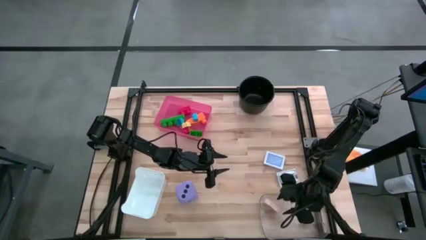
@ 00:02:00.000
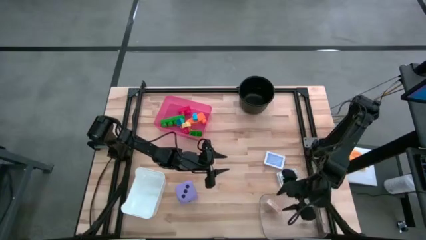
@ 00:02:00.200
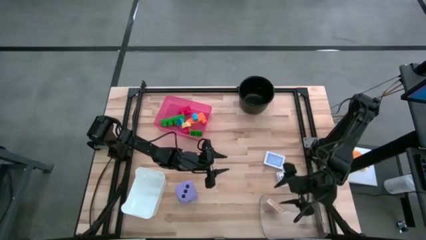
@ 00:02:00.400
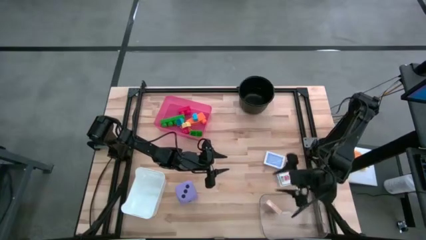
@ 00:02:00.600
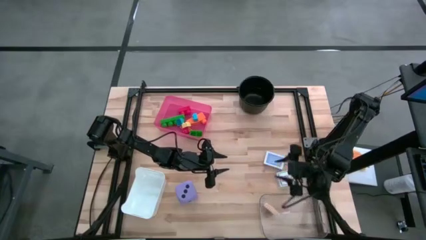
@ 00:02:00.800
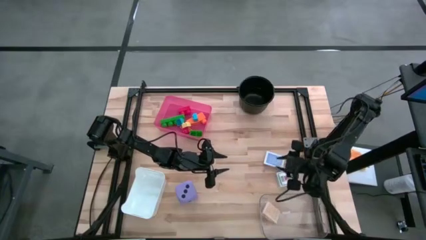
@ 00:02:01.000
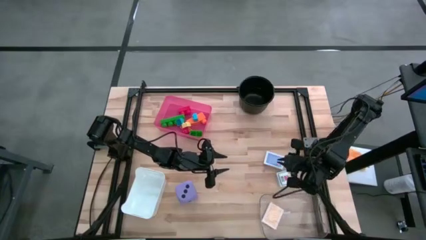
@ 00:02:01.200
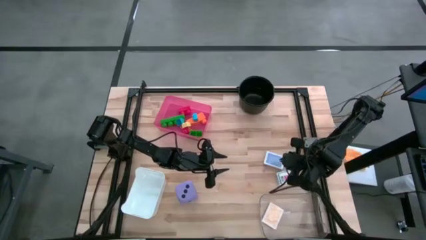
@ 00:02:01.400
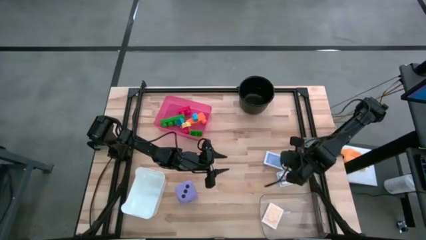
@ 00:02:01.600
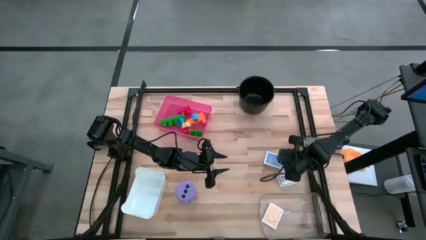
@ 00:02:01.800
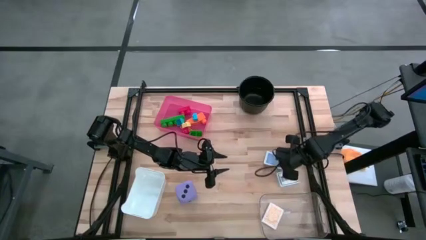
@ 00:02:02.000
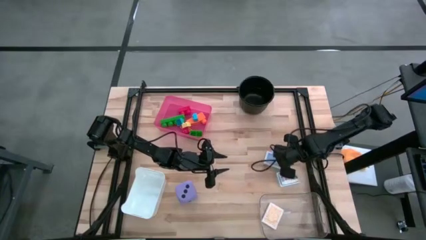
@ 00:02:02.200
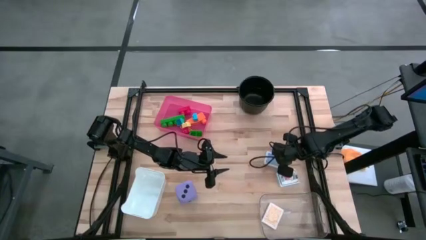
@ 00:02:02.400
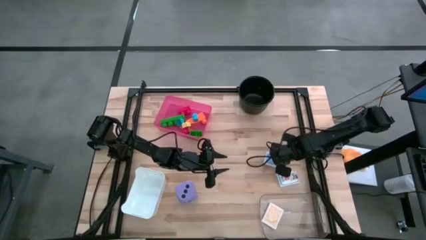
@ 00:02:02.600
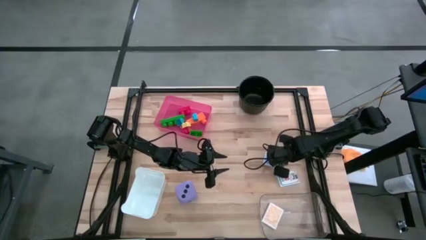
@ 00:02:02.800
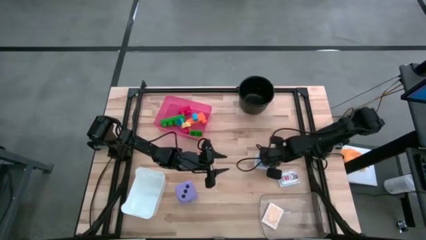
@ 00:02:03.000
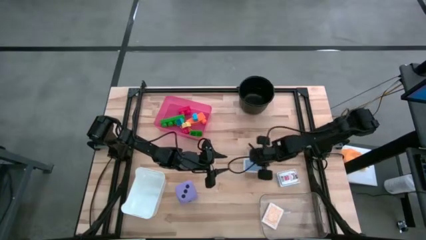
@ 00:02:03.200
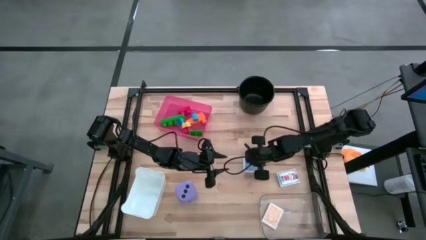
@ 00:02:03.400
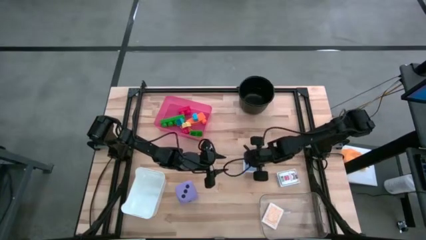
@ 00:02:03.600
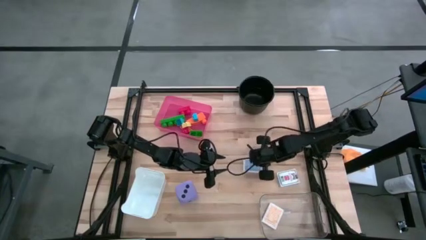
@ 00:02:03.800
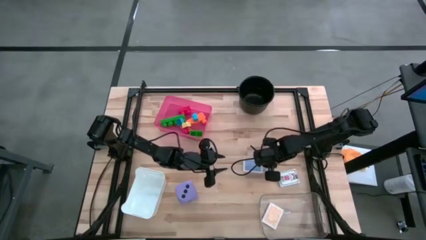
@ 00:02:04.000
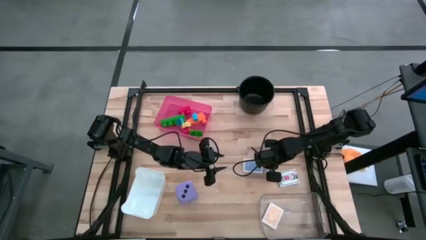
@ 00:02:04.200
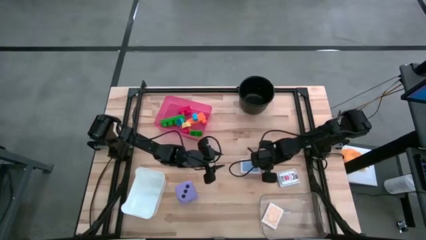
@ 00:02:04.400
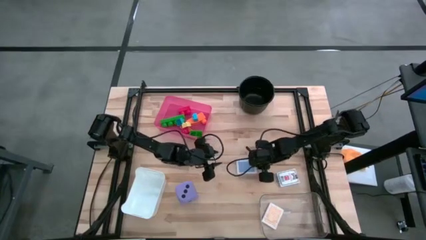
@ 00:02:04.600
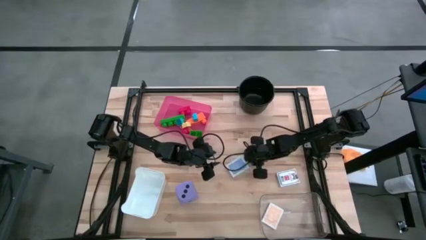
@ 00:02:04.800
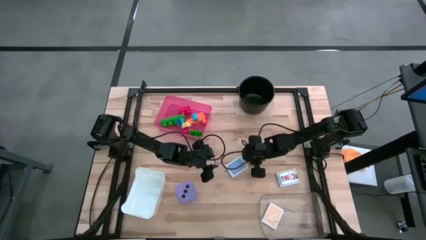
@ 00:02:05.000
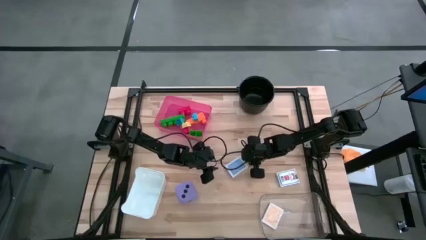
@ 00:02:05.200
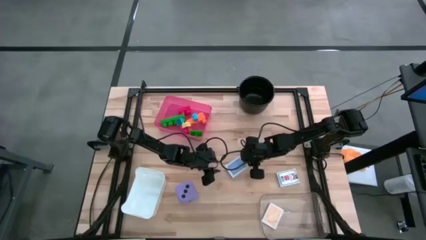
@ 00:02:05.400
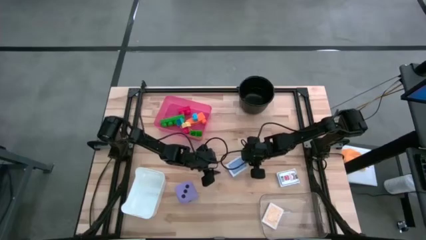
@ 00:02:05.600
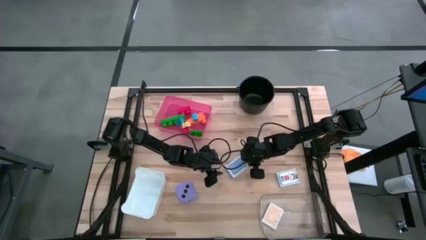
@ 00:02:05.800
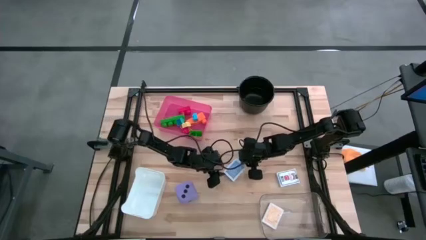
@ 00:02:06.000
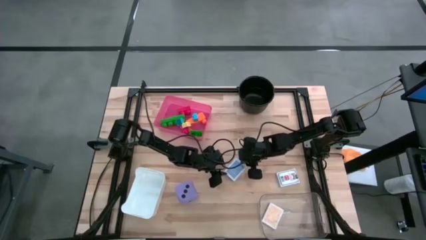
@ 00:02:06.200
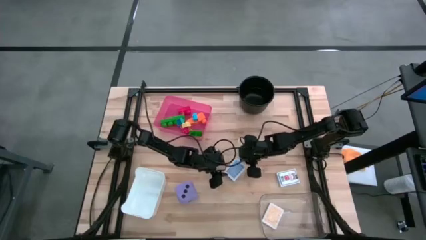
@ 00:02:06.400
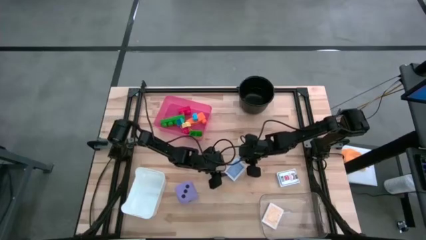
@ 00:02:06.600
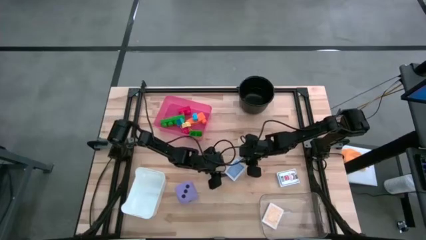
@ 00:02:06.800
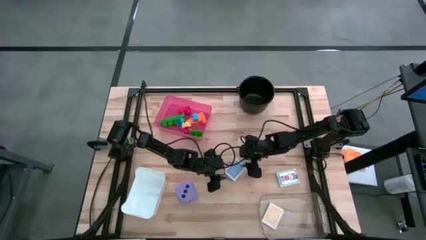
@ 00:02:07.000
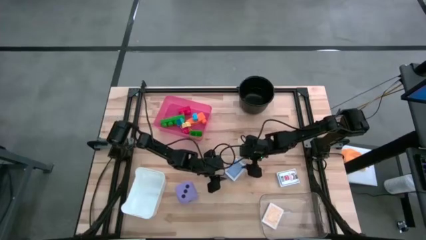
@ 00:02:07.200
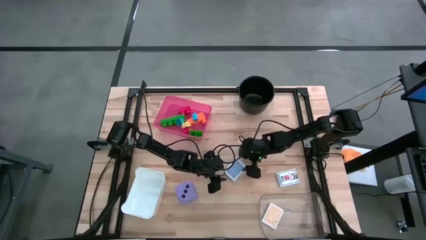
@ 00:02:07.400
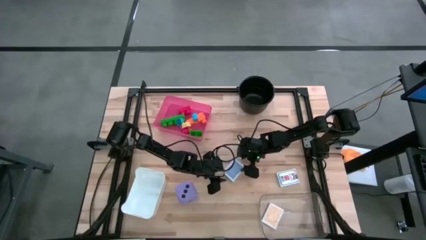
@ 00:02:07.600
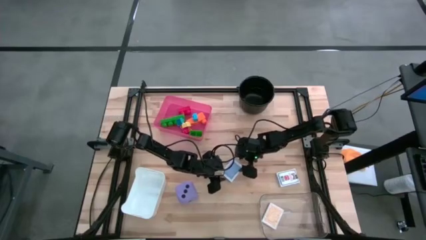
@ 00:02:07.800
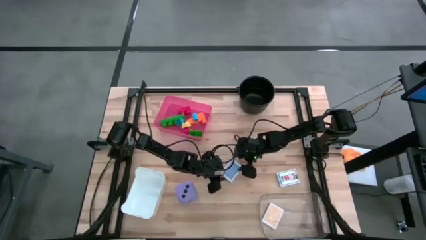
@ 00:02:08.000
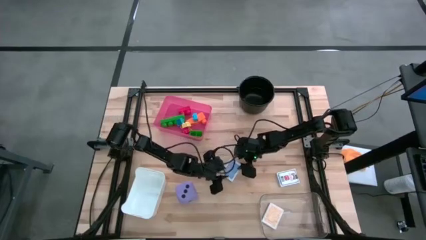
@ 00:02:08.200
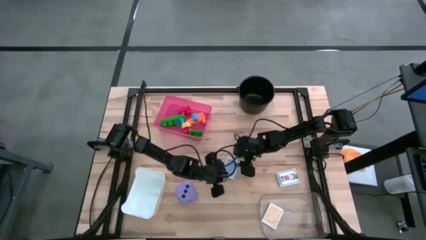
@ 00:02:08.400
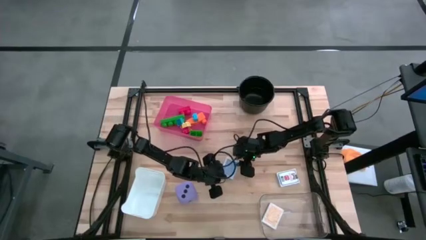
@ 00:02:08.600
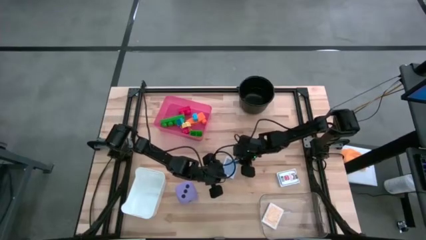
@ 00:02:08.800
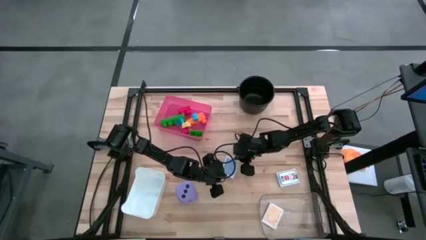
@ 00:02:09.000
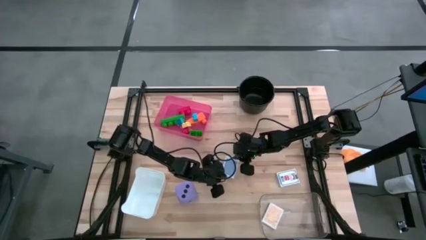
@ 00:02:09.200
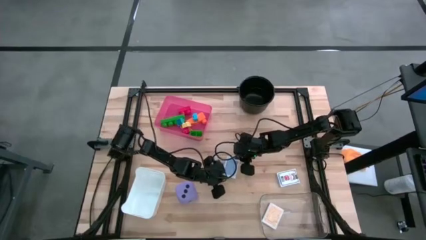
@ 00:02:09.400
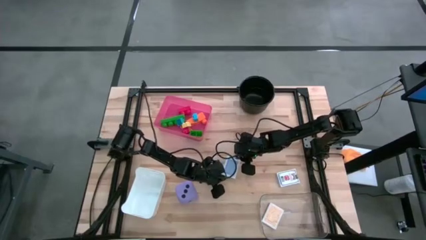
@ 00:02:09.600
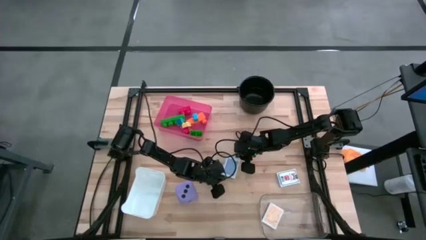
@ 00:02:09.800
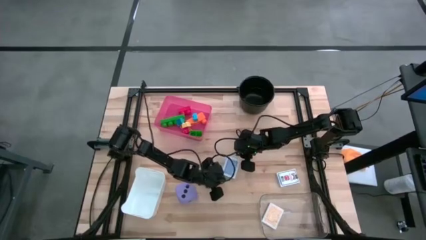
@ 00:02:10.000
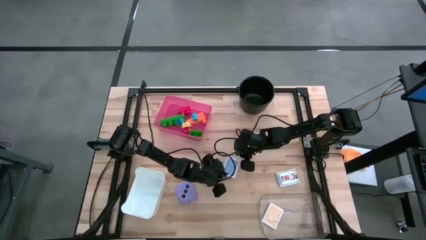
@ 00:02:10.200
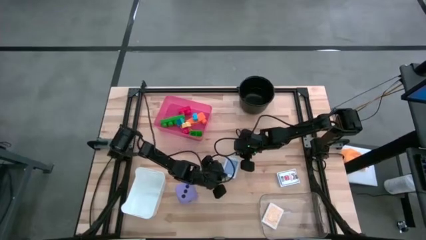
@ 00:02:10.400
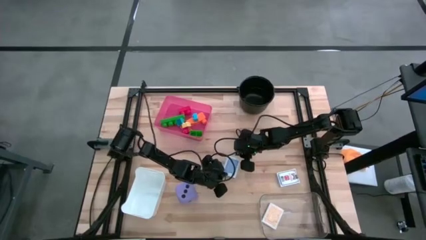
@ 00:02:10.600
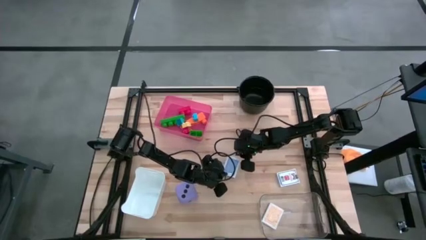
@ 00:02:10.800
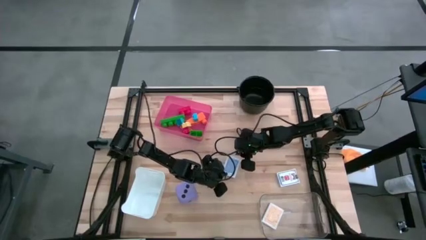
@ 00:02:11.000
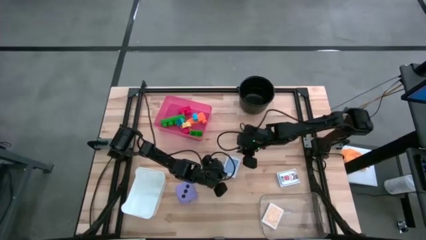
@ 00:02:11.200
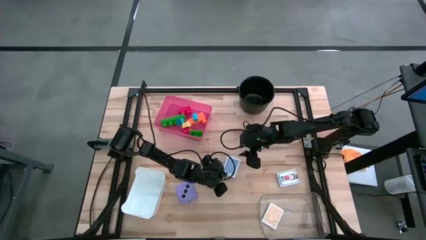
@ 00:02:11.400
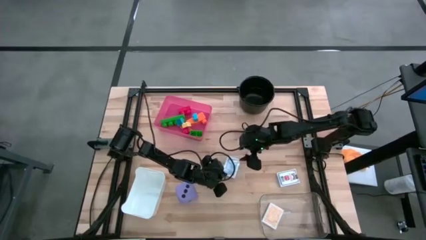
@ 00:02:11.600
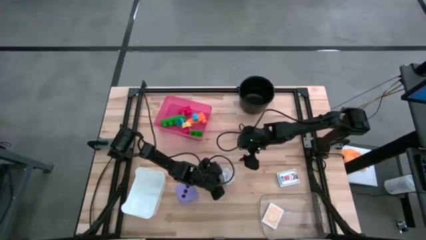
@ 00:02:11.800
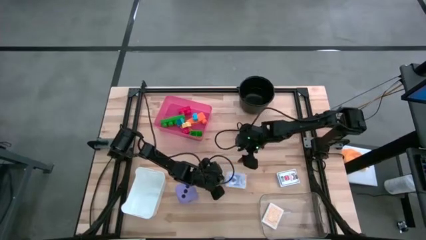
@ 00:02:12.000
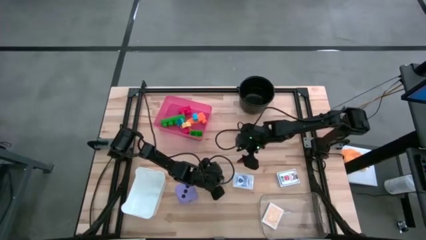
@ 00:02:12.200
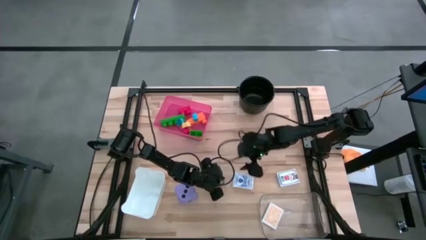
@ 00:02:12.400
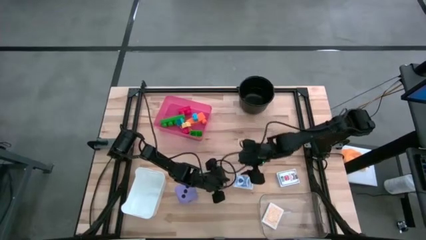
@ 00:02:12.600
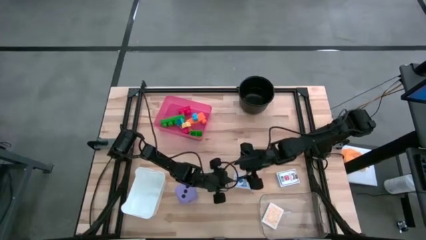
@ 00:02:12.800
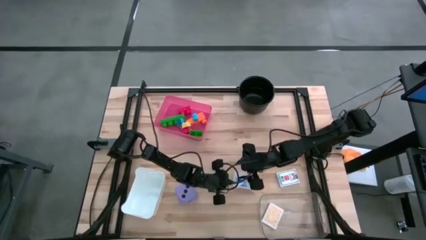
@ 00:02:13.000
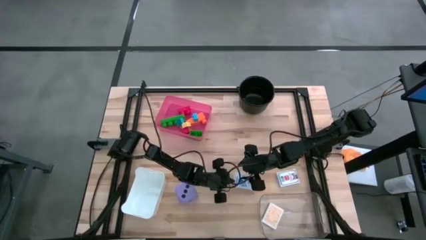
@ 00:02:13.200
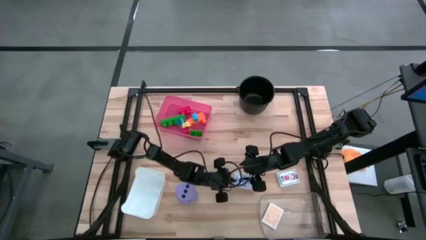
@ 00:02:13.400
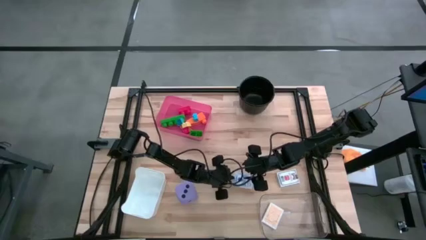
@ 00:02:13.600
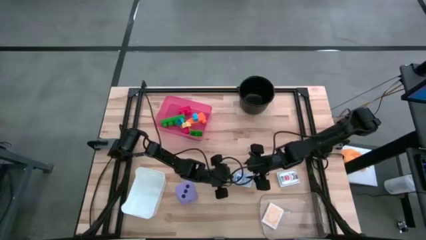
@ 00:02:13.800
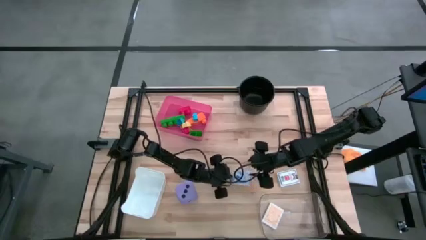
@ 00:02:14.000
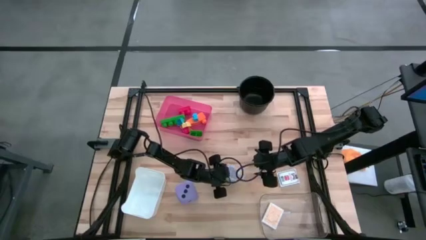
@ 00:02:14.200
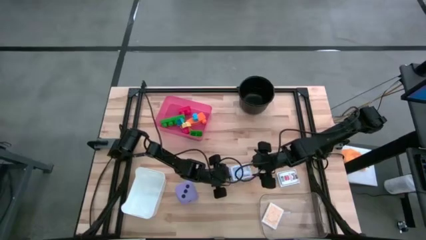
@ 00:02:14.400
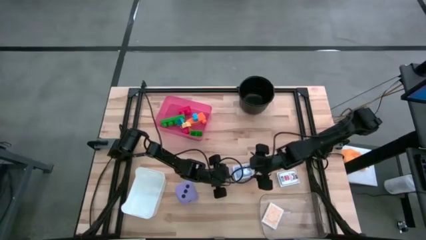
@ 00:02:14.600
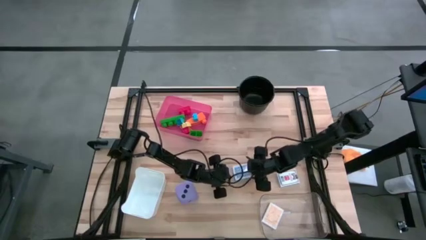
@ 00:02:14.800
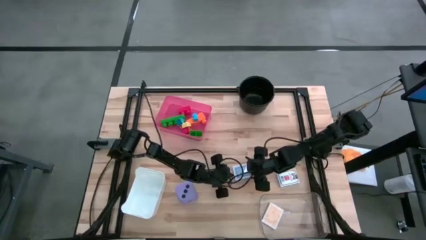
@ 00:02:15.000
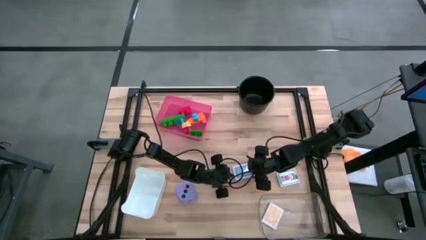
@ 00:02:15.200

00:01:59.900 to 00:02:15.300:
Task: Pick & Place Toys
Put the blue deck of cards into the transparent bin
